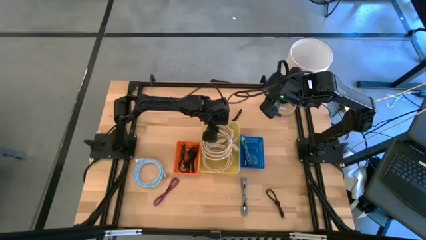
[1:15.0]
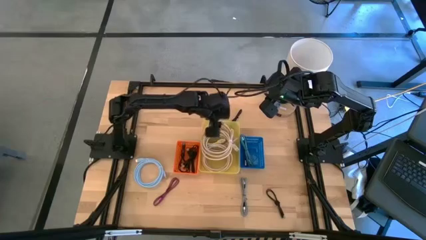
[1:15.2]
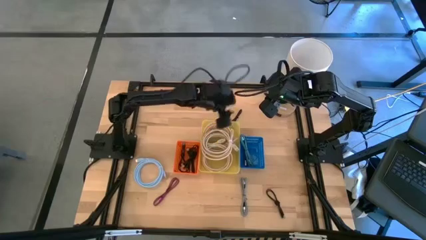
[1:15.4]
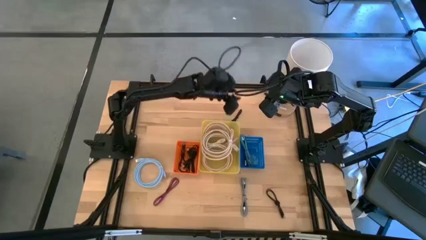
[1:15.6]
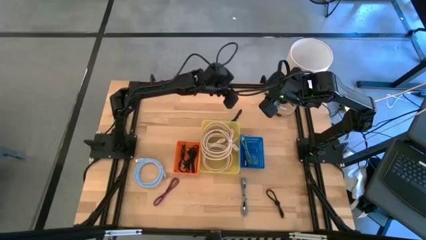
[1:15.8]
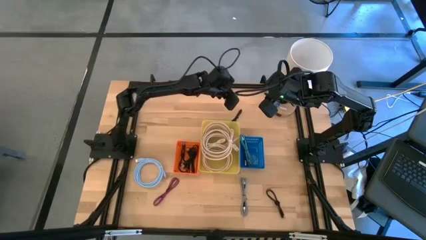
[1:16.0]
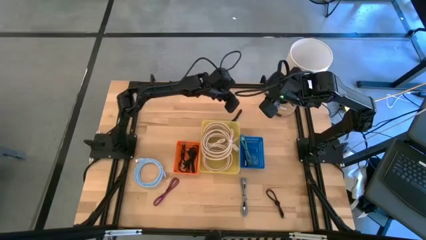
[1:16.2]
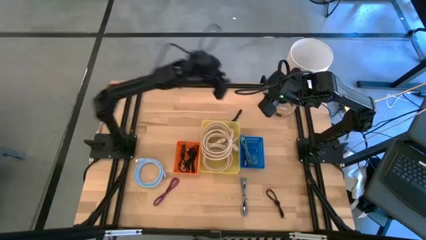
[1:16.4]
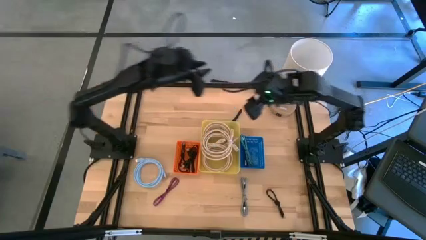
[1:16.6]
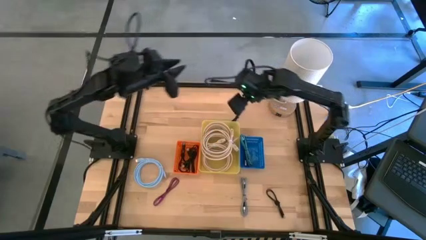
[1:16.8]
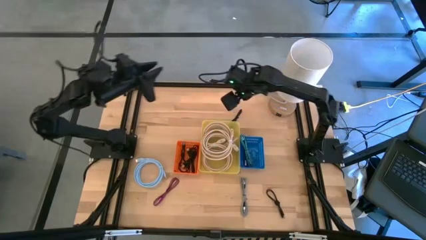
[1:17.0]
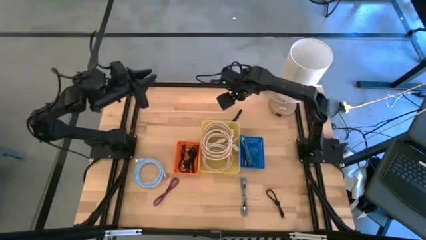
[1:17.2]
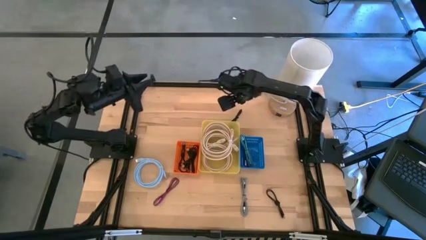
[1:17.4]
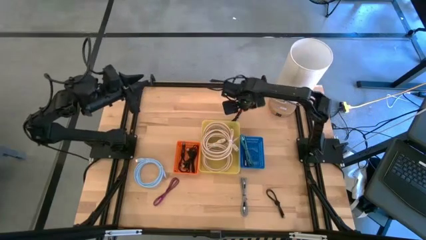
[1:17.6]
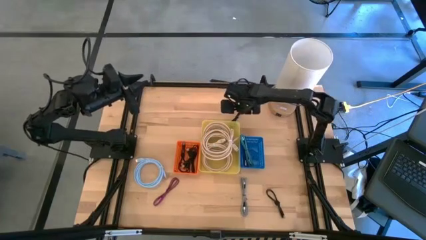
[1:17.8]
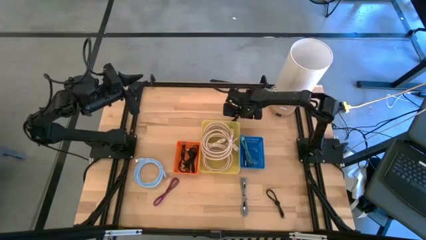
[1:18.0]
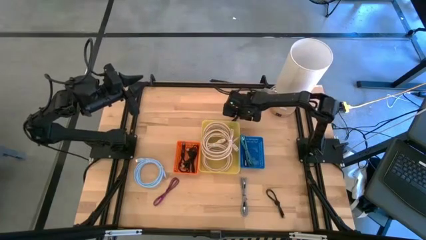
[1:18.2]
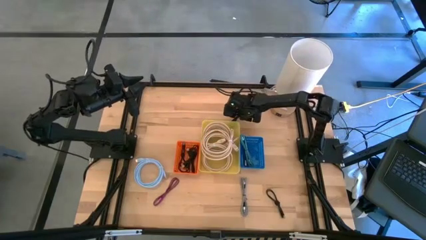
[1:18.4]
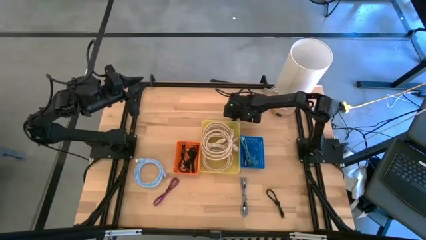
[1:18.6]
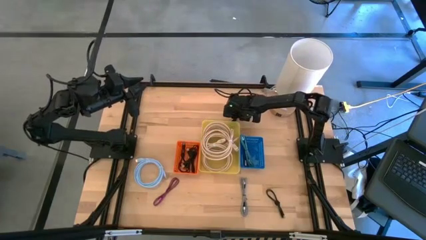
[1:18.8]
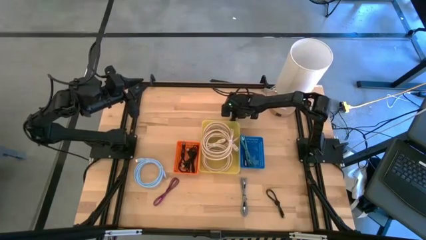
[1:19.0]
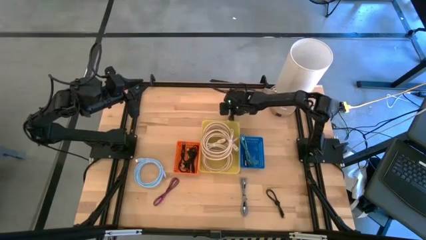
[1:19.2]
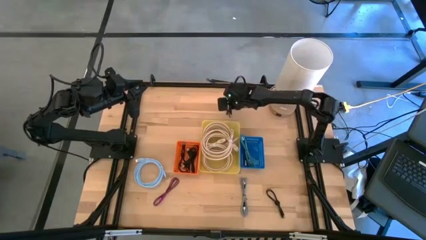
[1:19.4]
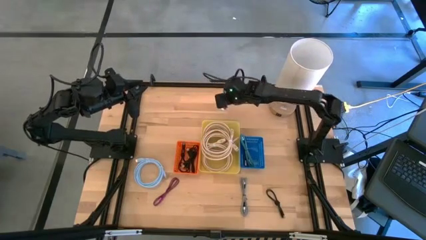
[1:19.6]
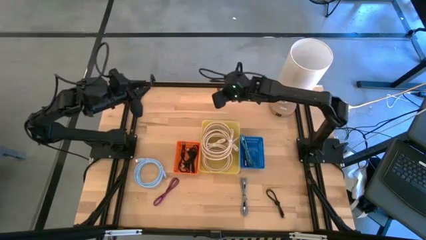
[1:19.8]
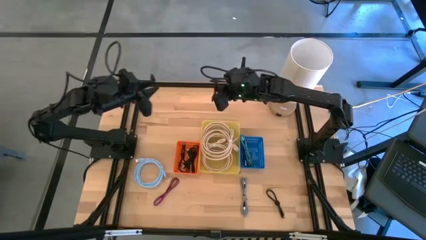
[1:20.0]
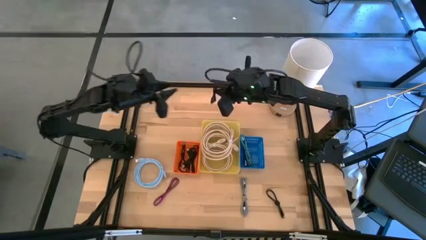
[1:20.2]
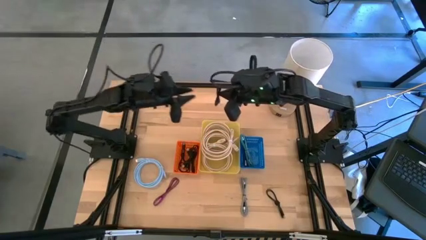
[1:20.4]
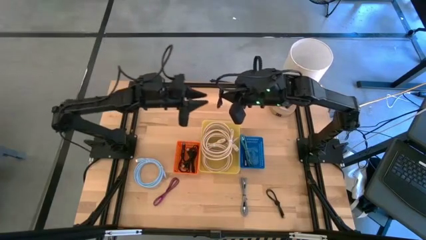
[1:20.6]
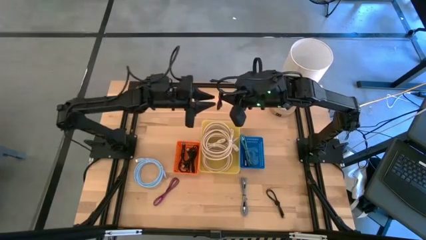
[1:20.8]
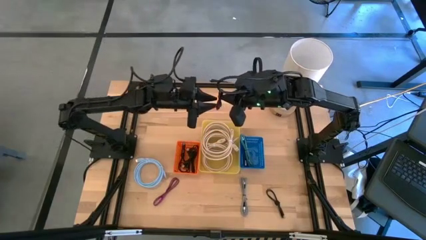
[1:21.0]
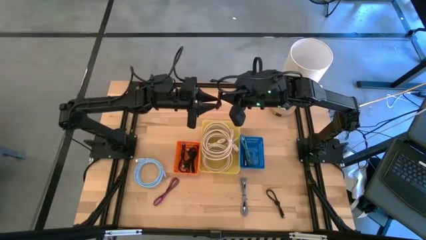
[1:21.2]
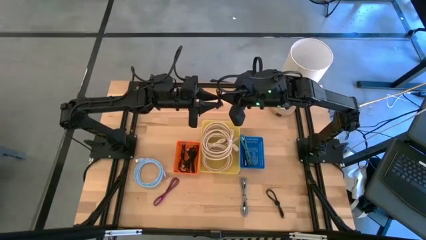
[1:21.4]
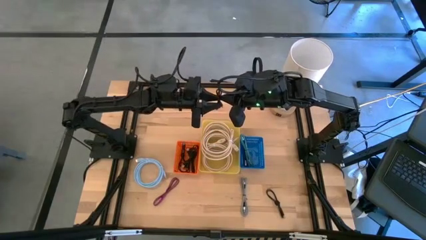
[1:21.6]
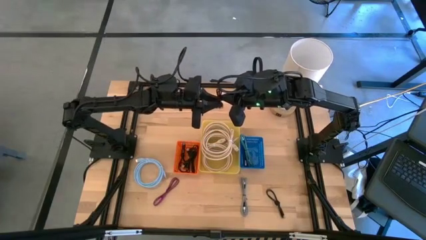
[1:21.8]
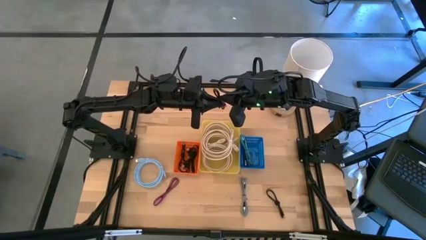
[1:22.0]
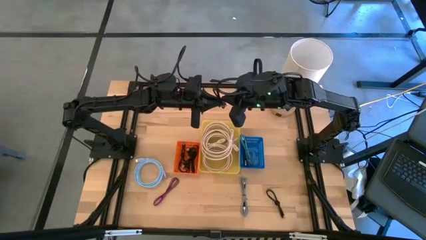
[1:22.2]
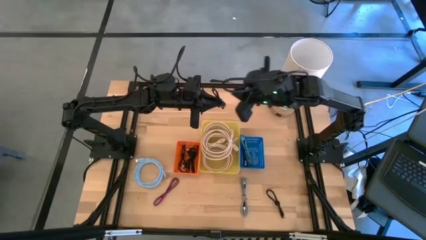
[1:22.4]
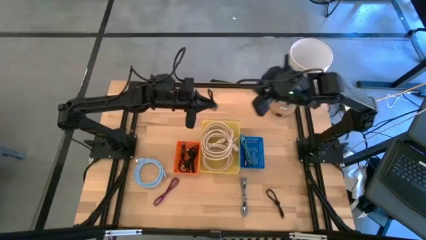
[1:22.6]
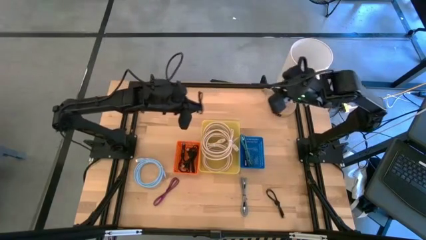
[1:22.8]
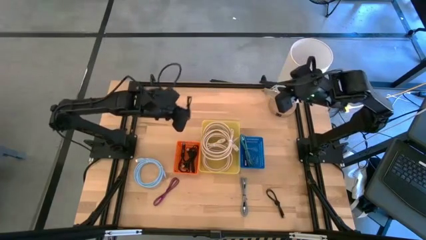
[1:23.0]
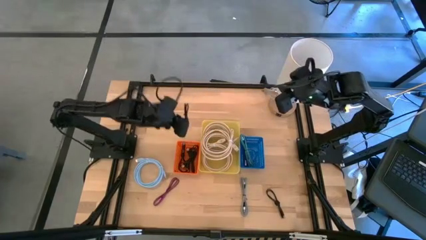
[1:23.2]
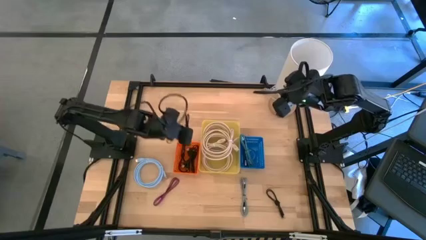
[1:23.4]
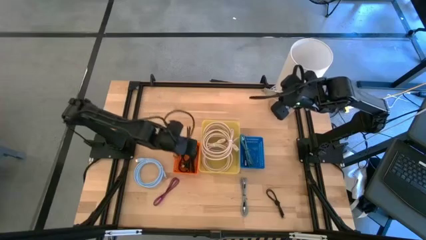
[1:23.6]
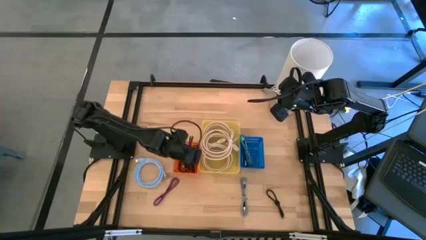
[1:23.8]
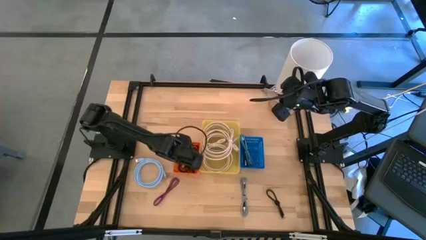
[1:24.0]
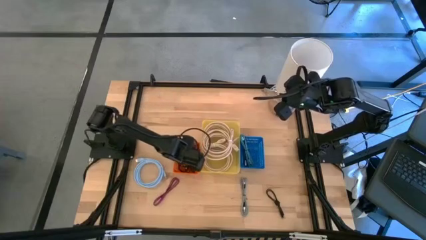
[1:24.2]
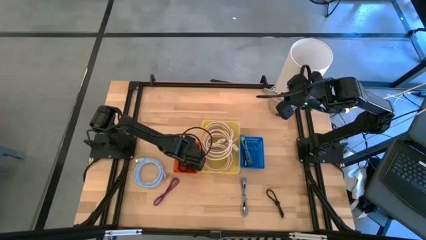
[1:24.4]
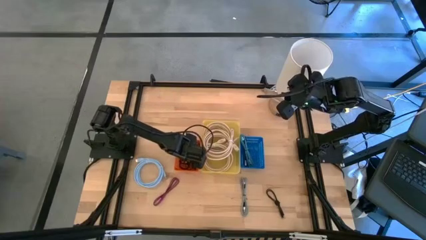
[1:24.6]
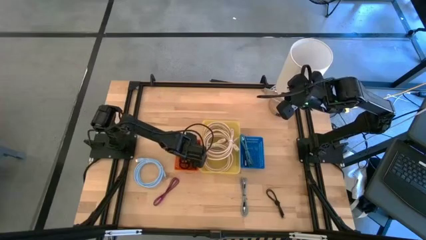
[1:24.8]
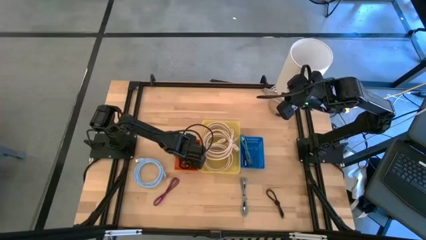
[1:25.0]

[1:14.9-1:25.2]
Task: Pick & Place USB Port
Put the black usb cable into the orange bin

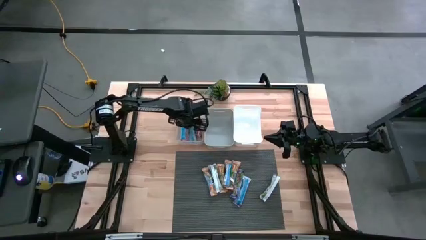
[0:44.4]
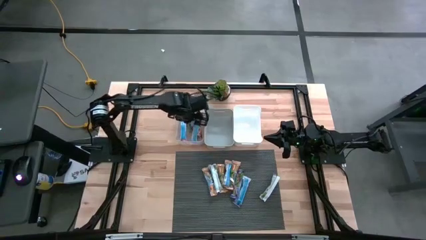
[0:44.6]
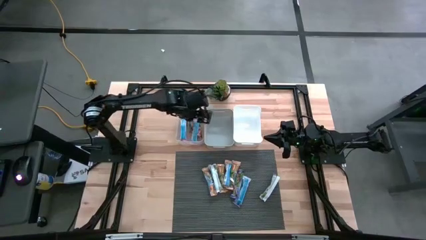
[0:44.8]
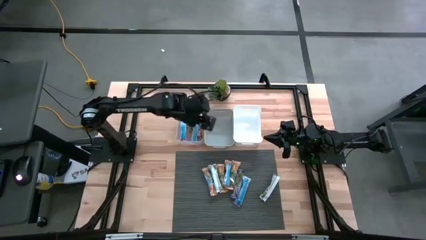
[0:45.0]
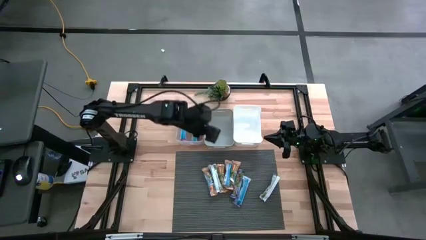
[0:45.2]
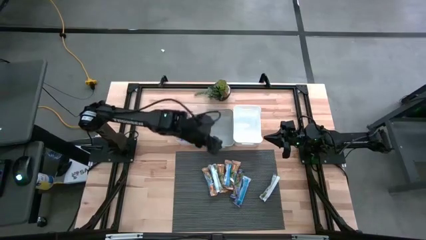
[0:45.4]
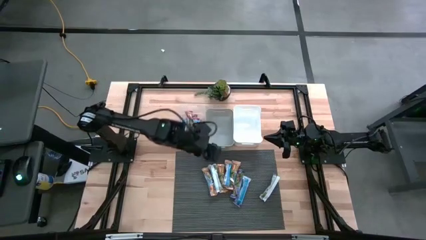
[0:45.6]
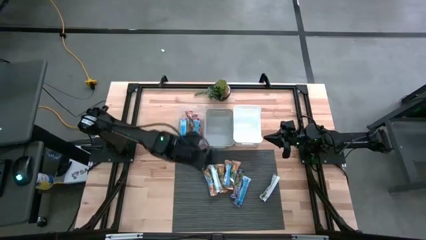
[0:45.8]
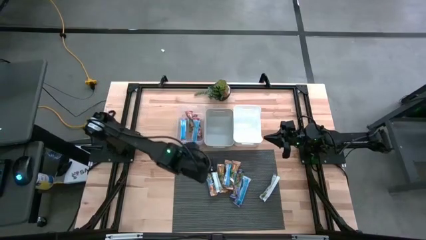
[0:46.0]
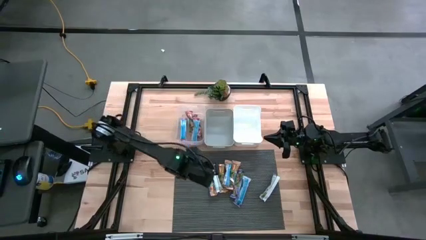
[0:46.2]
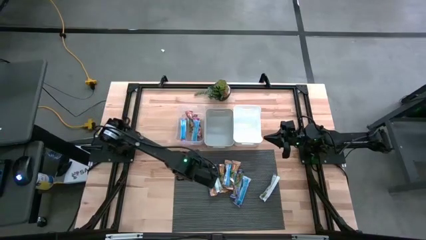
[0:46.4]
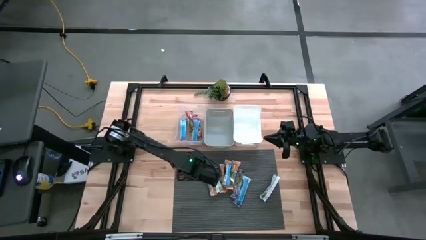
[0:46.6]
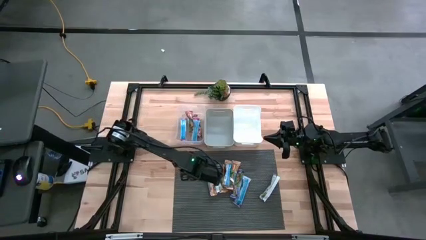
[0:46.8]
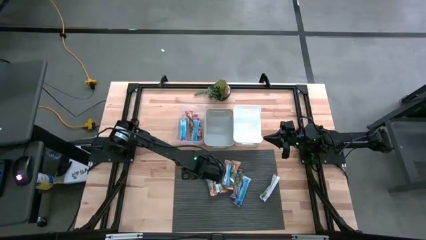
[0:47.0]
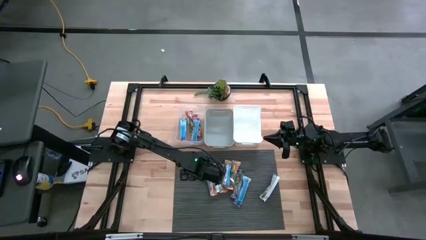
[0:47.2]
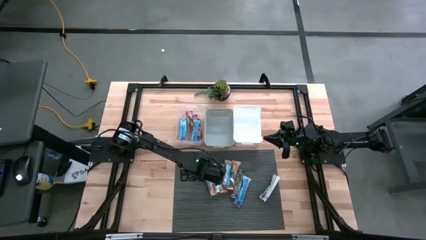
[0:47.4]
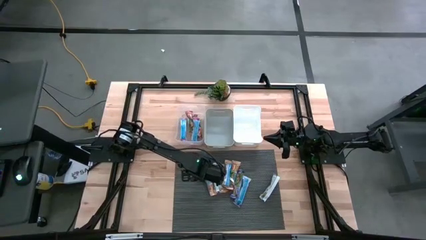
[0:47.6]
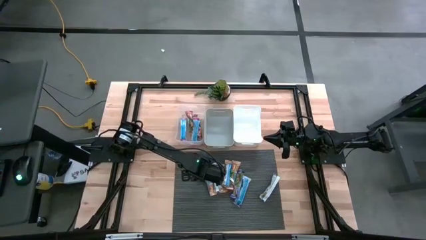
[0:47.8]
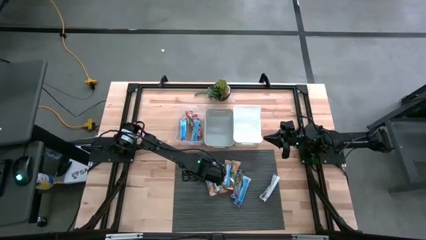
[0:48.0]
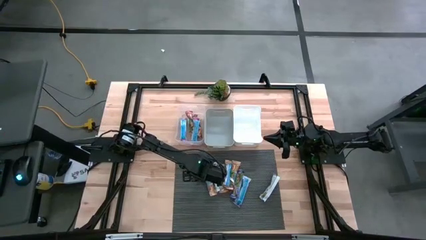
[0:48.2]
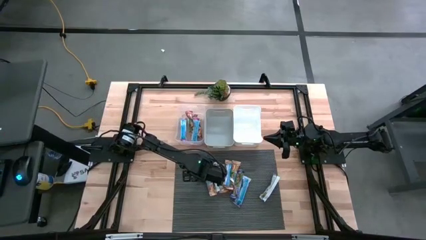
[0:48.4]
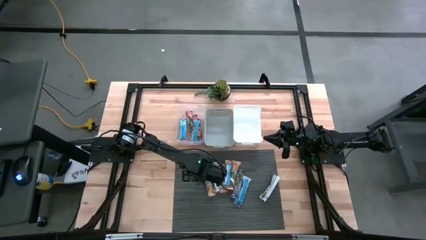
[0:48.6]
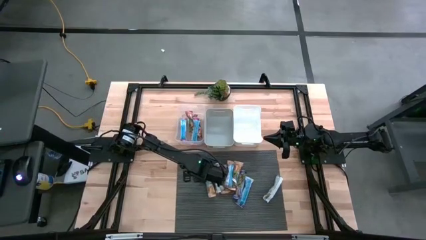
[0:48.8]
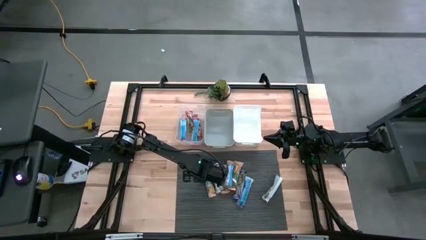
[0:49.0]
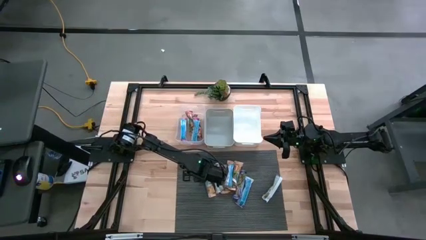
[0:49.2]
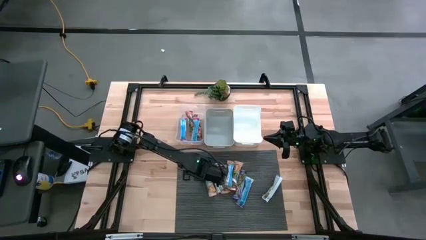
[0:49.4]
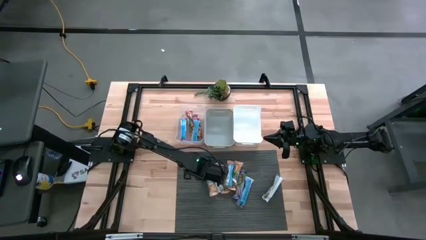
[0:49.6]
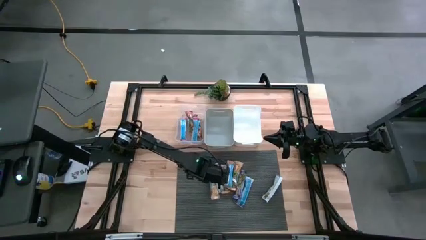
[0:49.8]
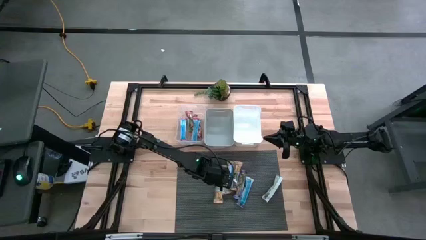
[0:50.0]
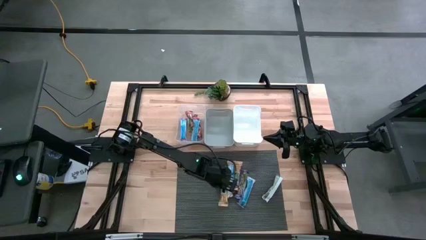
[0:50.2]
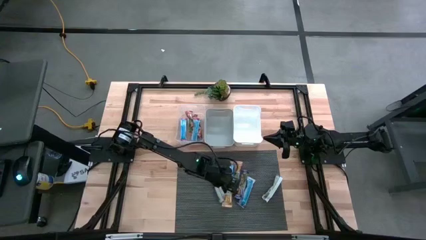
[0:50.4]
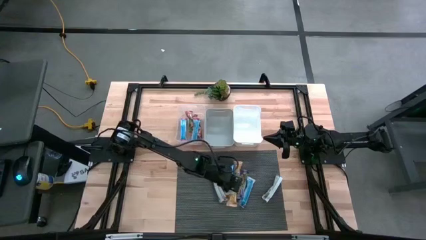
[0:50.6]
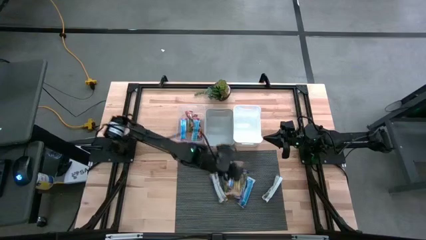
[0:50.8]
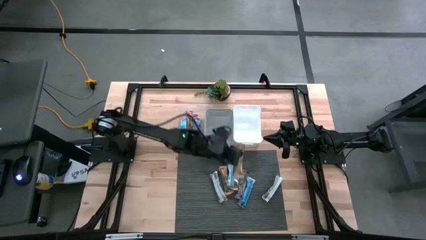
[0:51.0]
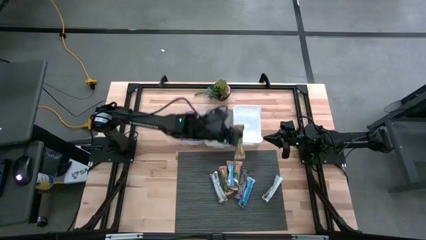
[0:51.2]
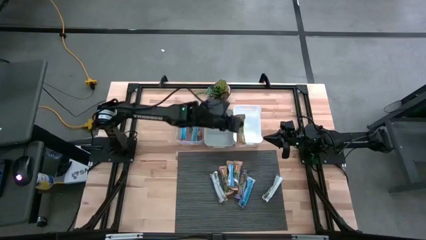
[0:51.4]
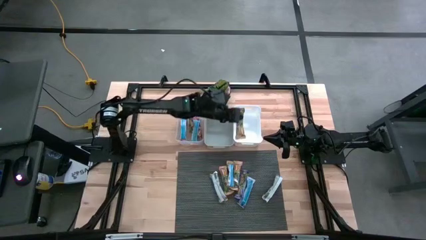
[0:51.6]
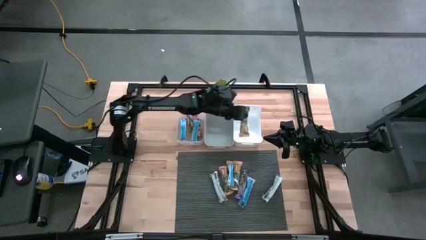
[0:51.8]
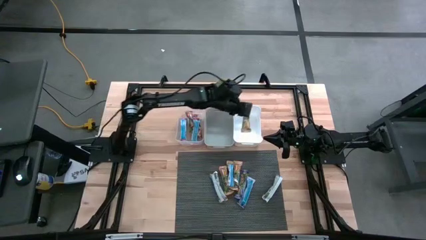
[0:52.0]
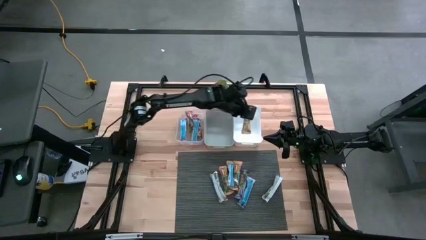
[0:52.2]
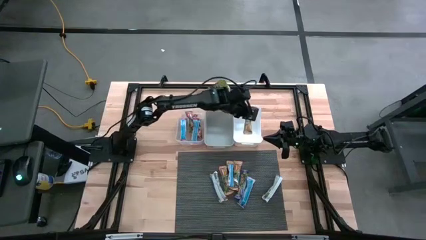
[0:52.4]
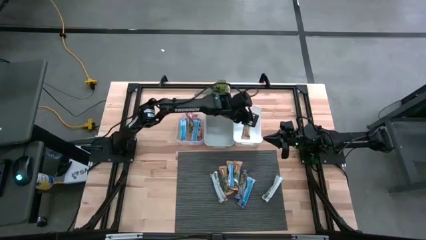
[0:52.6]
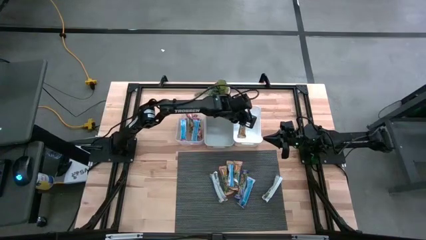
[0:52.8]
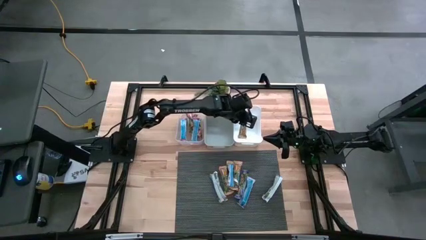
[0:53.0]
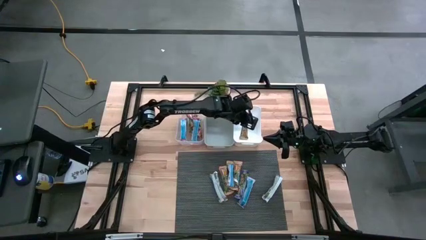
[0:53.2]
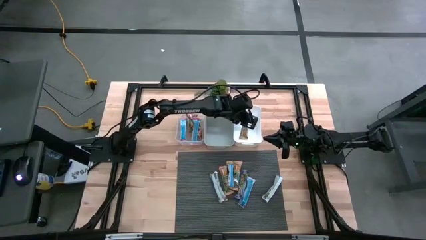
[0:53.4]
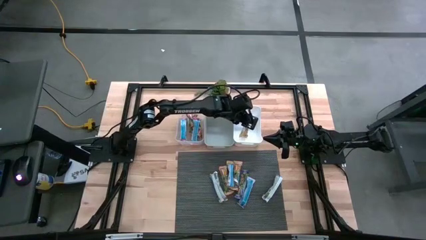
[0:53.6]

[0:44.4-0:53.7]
Task: Pick and place Granola Bars by type
Put the yellow granola bar into the white bin
